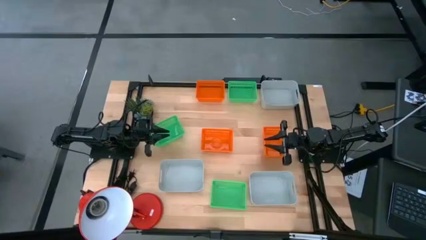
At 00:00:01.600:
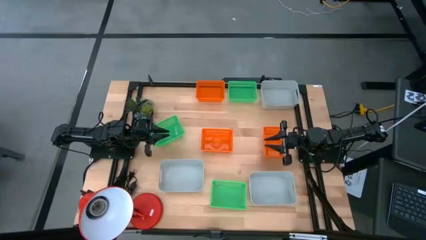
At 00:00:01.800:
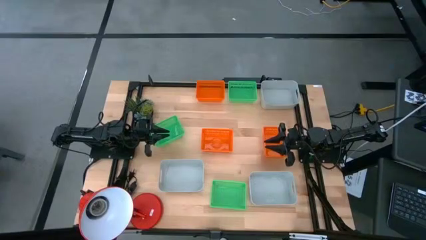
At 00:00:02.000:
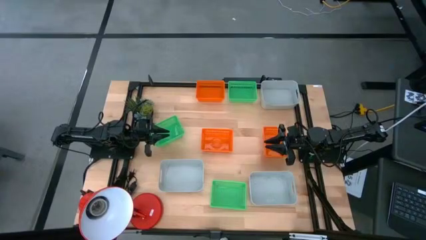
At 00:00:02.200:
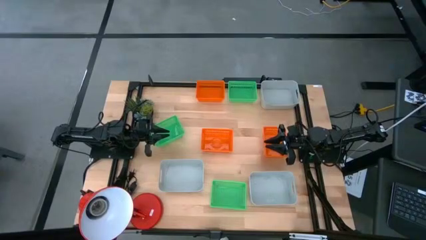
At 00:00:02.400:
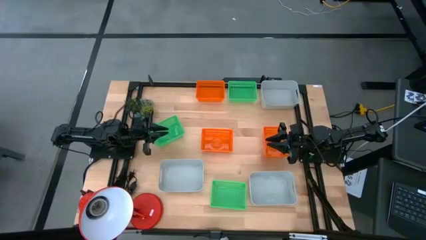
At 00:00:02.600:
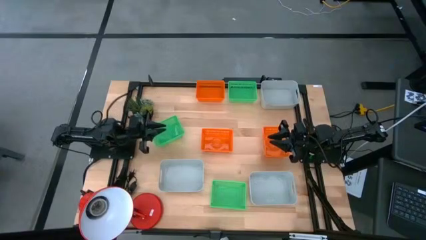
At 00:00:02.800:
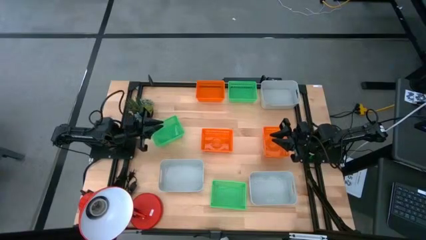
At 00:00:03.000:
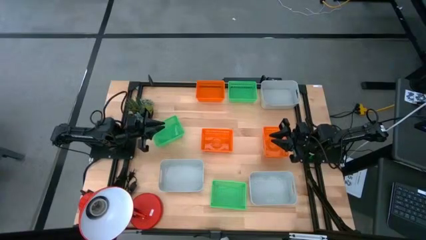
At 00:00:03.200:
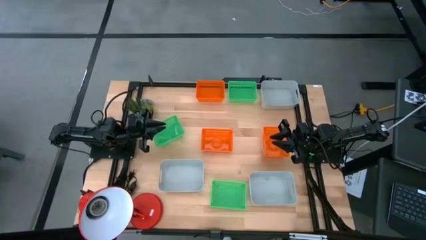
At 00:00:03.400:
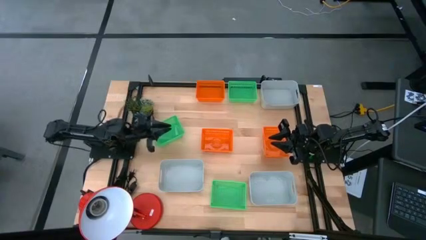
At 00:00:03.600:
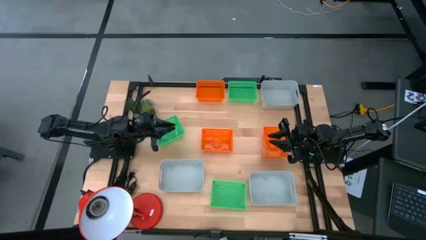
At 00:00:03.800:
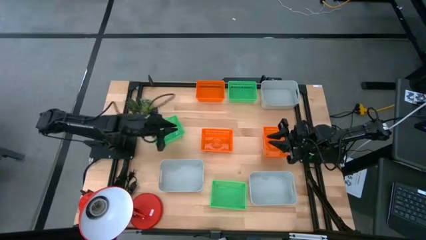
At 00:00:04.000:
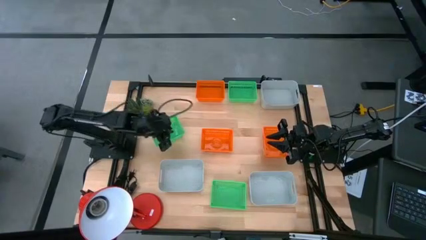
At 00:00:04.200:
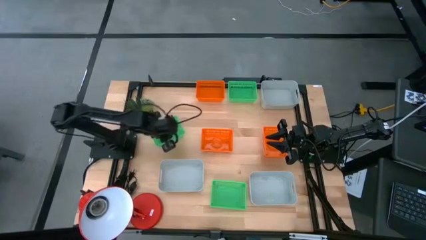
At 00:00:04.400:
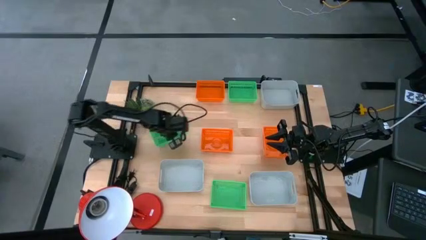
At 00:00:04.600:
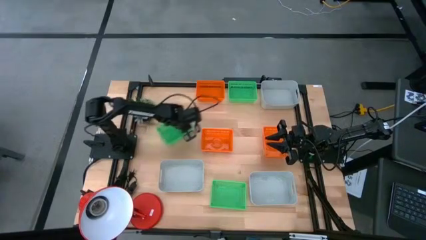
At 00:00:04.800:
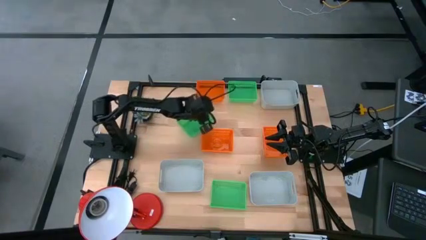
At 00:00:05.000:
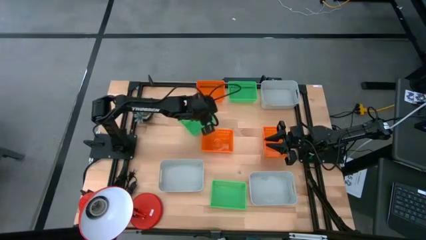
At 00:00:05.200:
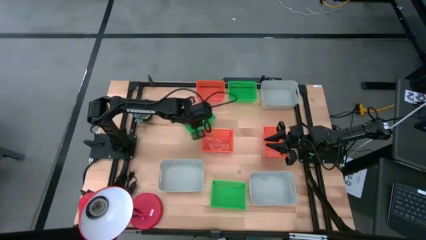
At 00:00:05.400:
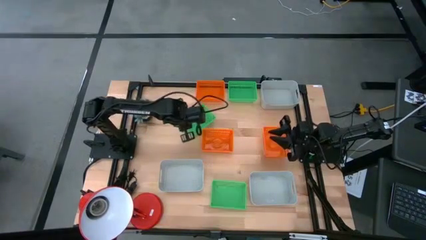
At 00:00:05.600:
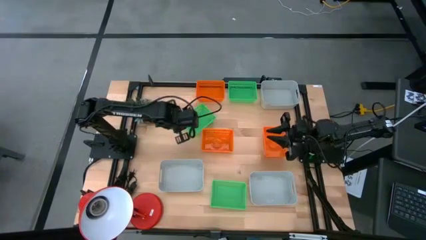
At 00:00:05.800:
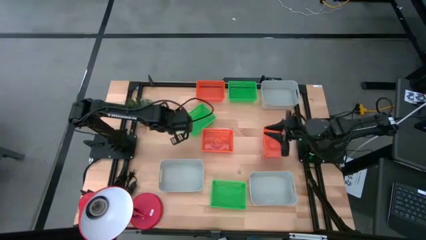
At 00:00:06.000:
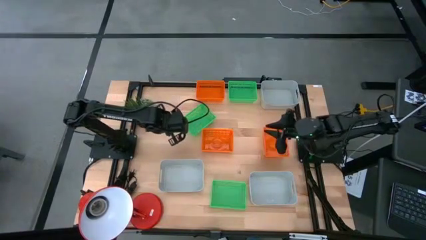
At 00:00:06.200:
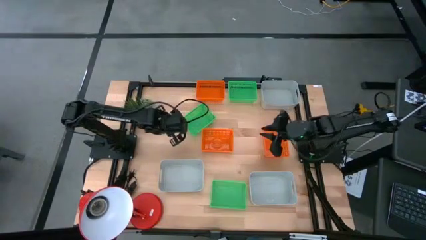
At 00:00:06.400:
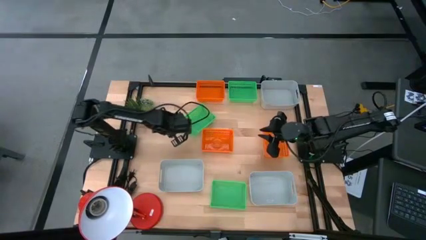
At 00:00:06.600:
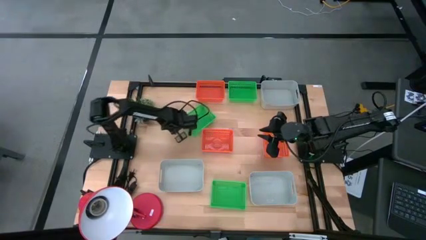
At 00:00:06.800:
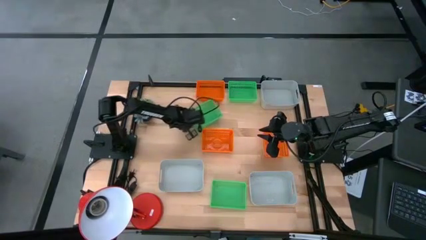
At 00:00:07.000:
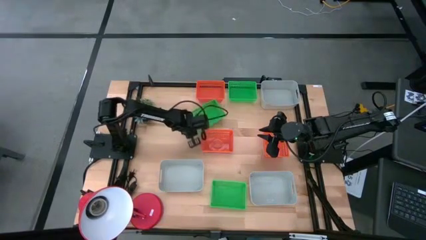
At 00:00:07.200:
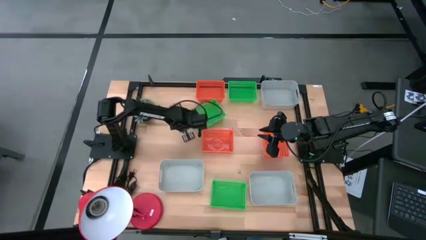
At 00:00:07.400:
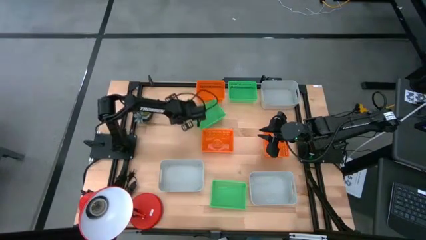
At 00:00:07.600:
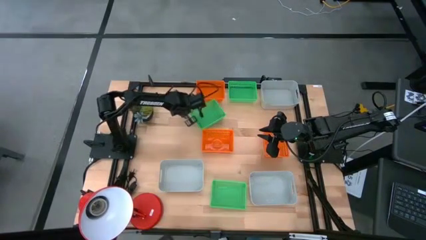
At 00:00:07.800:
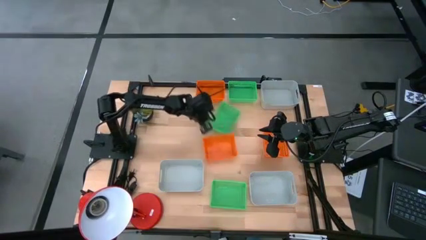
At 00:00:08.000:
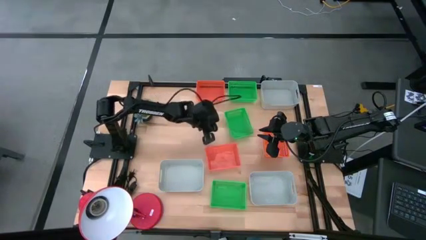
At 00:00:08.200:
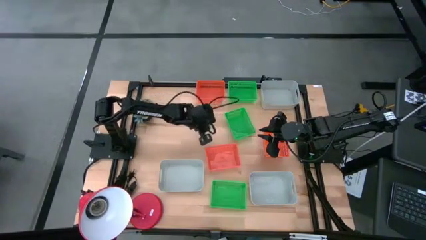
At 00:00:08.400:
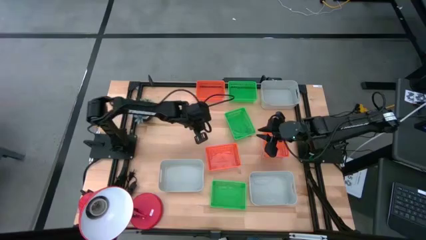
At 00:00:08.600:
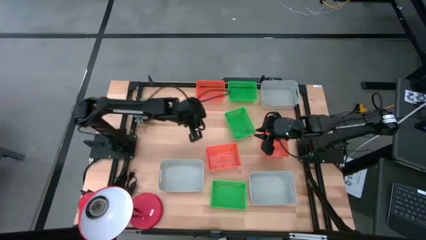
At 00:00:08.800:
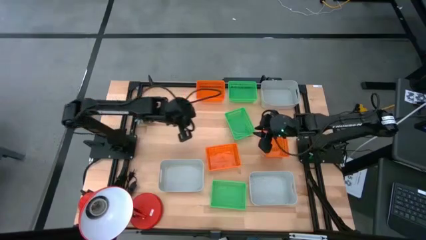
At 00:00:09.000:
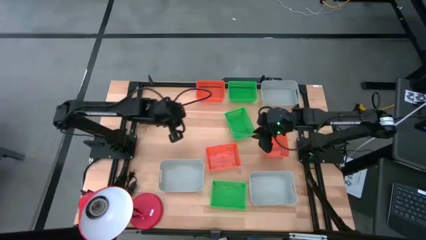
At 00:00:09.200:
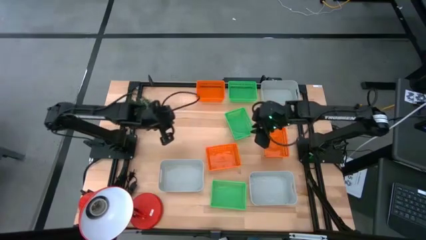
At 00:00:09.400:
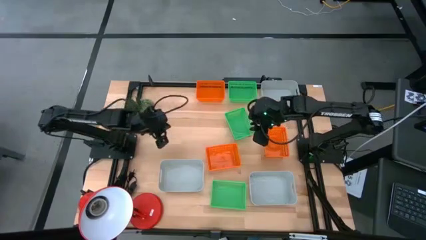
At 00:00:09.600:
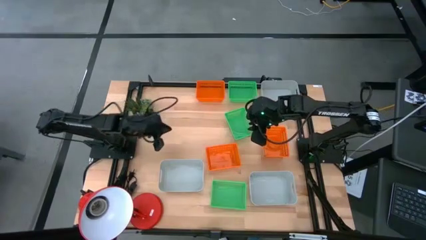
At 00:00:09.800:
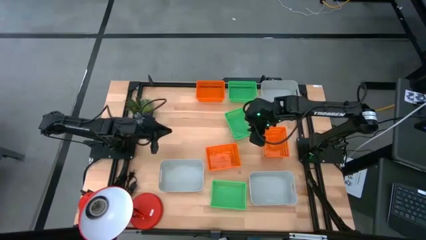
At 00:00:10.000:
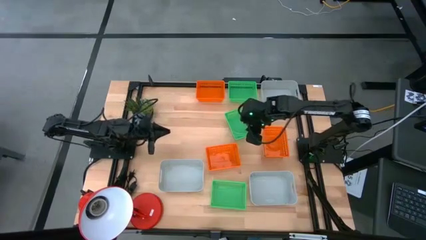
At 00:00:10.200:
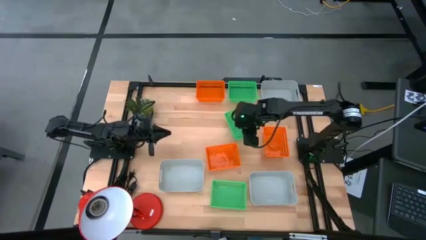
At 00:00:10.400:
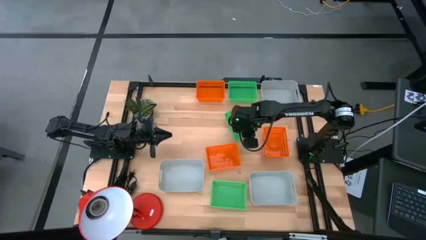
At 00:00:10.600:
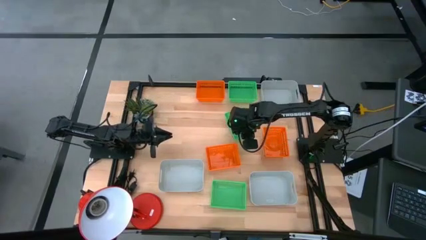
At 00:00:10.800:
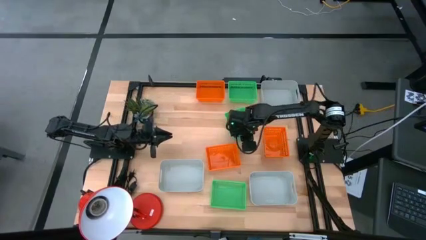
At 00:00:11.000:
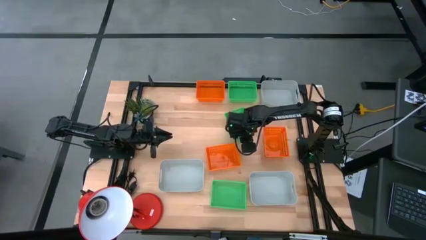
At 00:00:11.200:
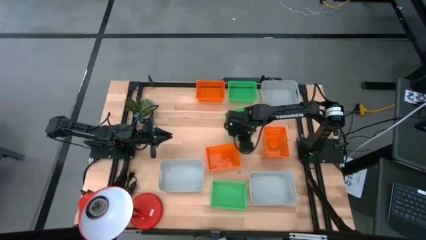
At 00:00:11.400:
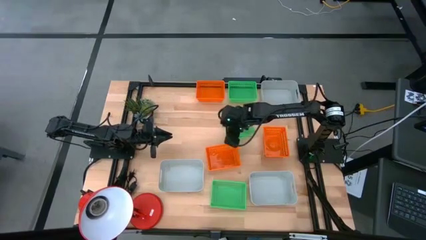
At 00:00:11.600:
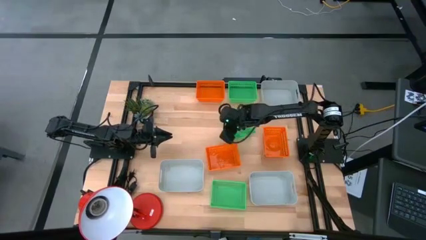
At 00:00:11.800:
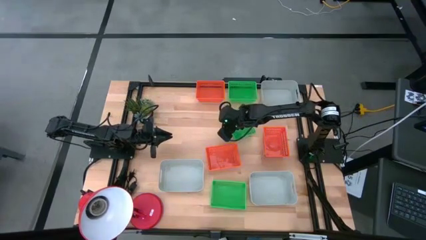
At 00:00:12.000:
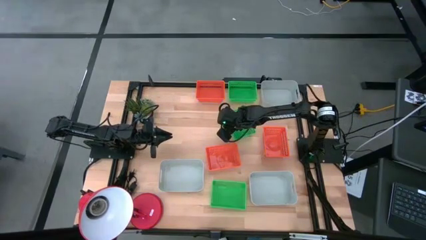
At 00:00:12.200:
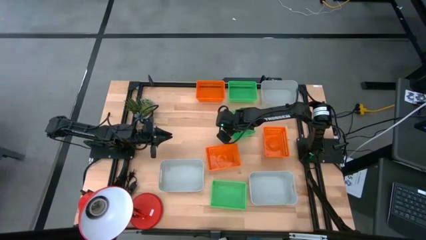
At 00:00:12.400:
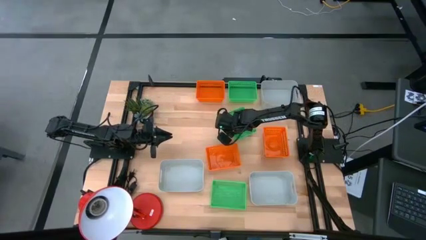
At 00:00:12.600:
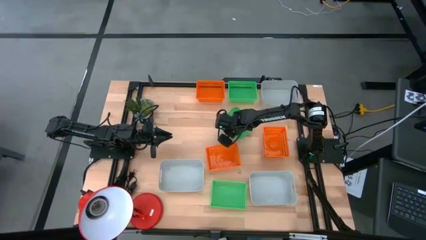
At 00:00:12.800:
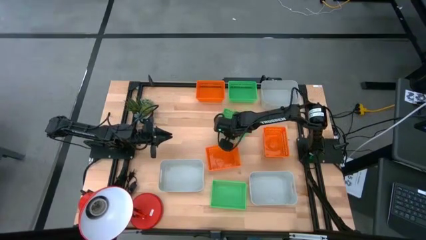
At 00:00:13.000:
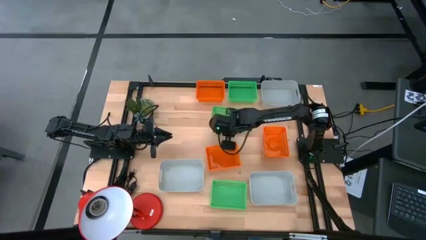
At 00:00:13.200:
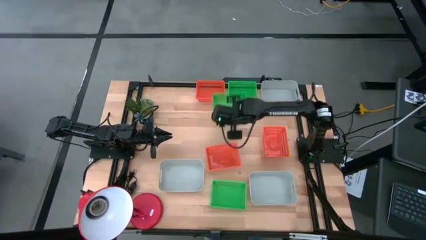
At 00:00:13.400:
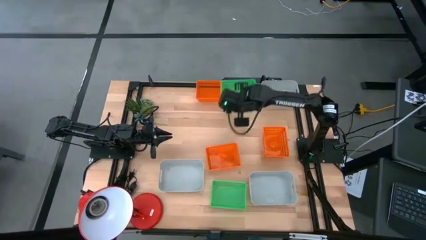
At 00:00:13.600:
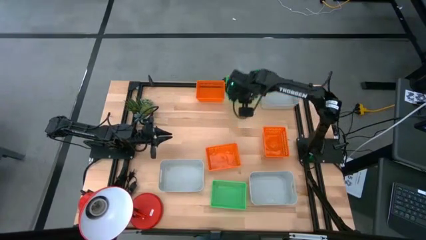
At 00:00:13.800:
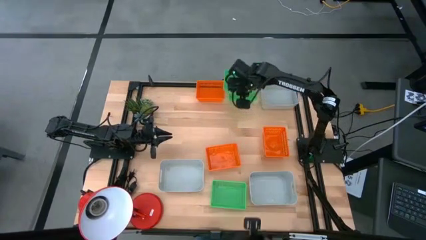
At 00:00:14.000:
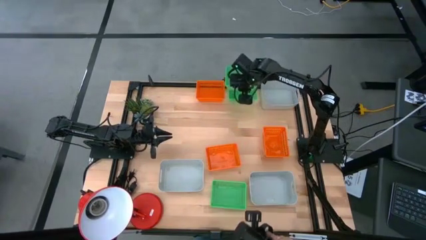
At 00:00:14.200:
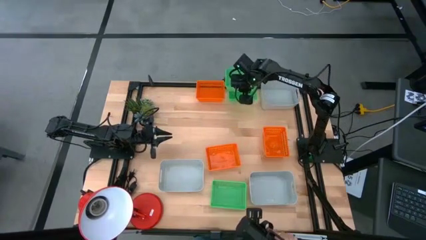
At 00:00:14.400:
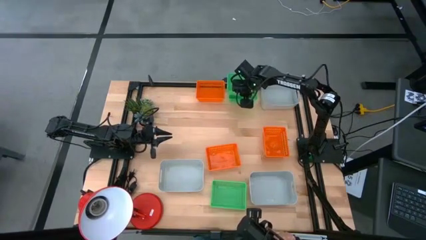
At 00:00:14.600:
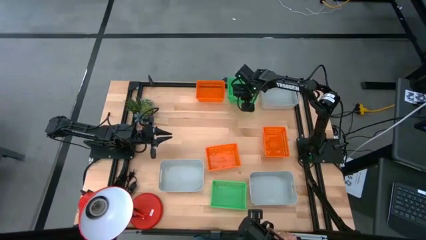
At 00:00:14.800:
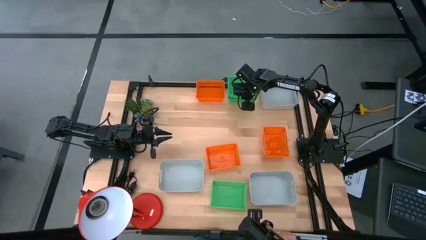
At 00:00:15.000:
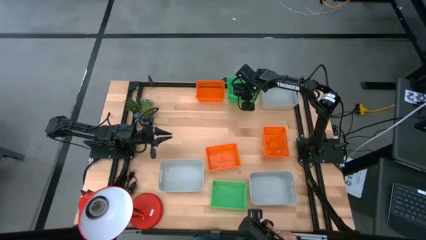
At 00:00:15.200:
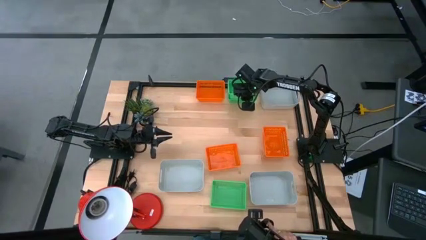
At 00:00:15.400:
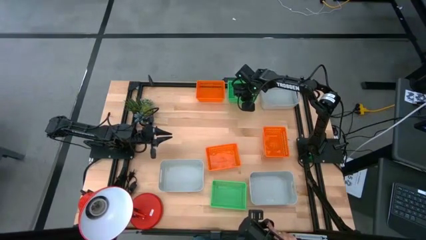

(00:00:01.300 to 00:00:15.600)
Stack the middle green bin on the top green bin
